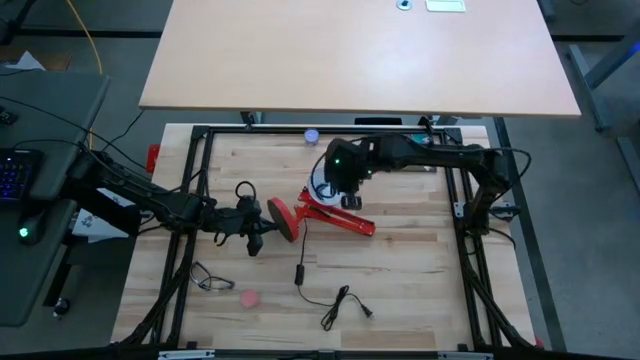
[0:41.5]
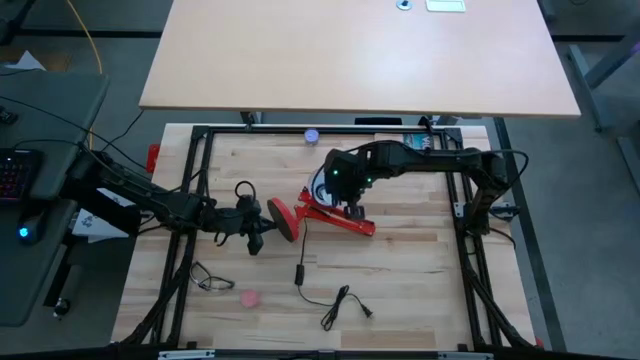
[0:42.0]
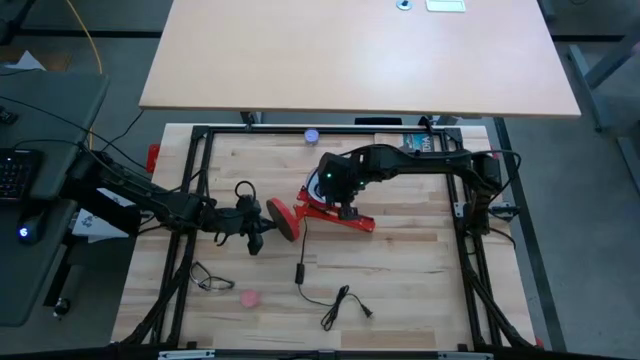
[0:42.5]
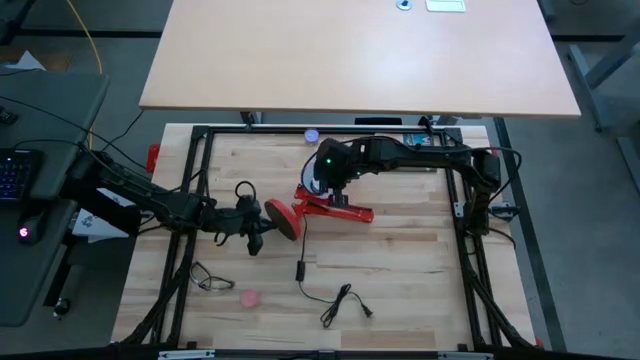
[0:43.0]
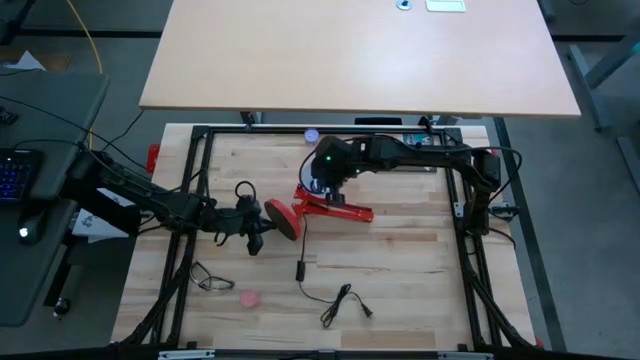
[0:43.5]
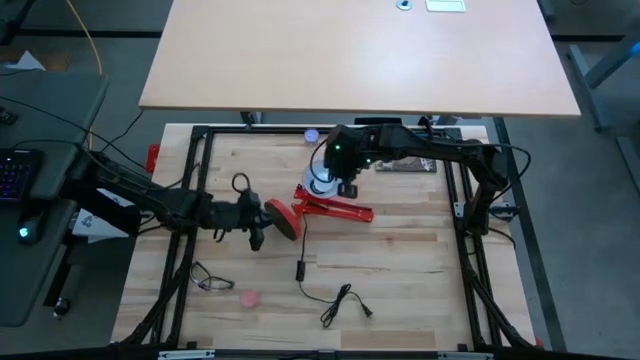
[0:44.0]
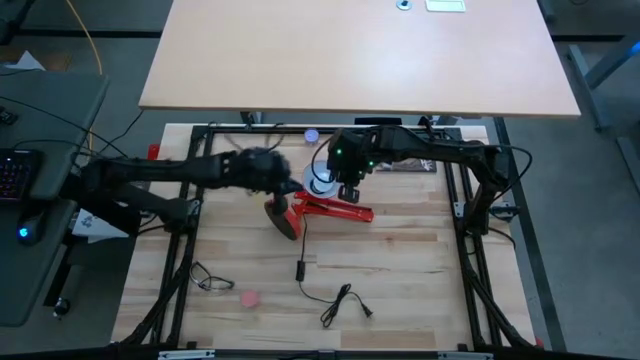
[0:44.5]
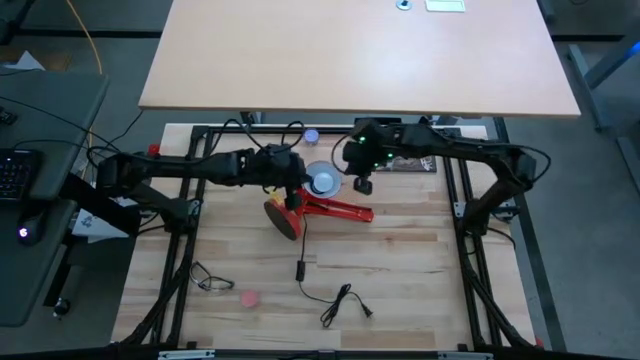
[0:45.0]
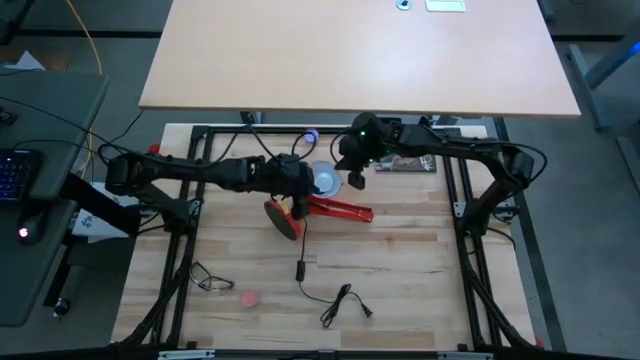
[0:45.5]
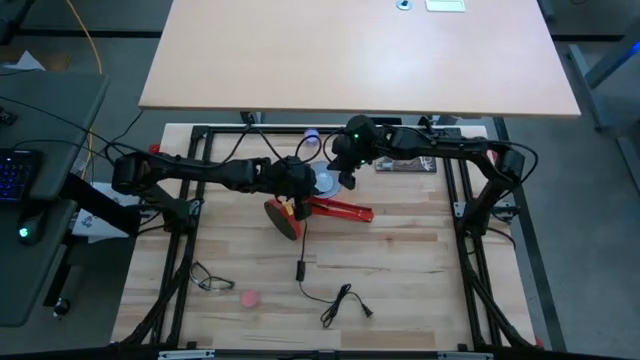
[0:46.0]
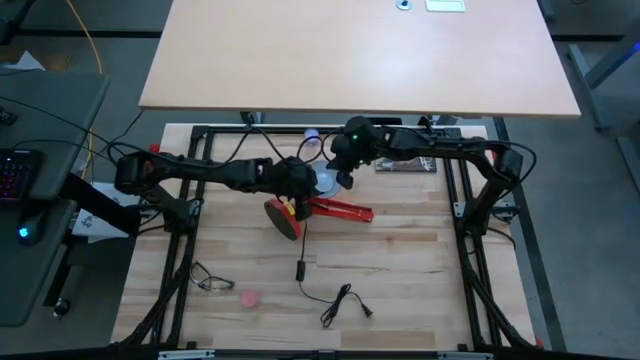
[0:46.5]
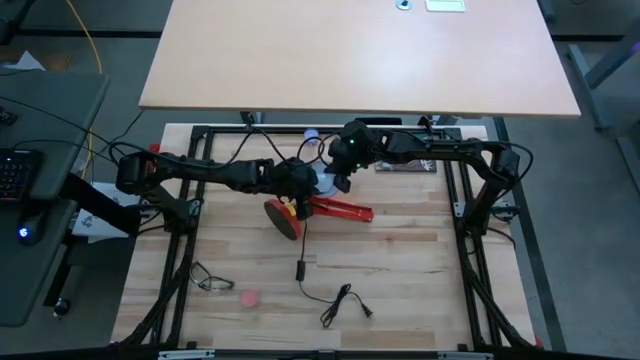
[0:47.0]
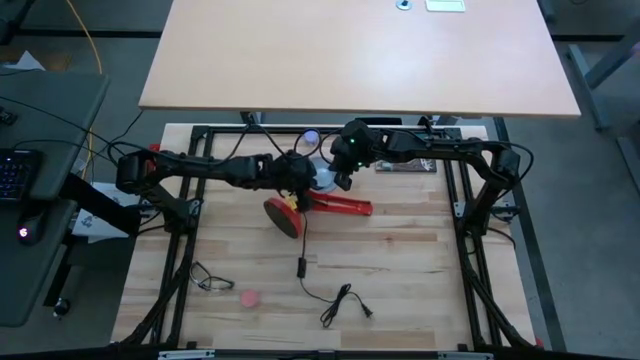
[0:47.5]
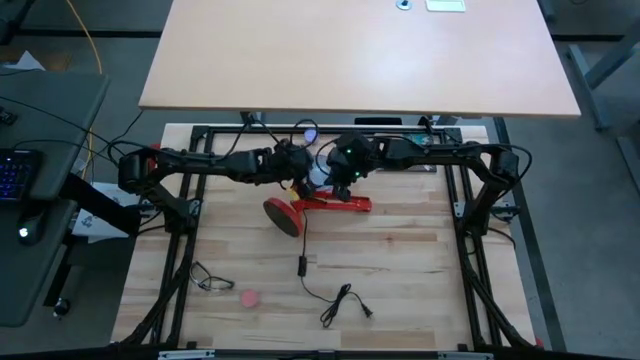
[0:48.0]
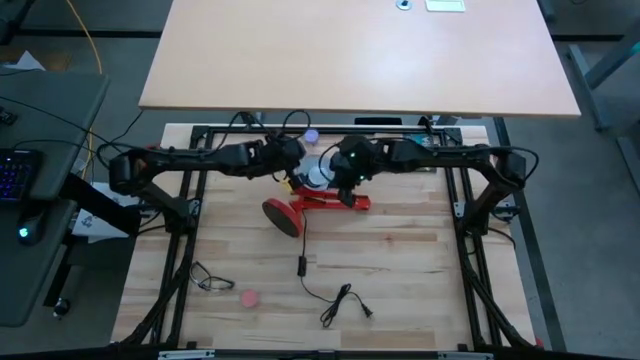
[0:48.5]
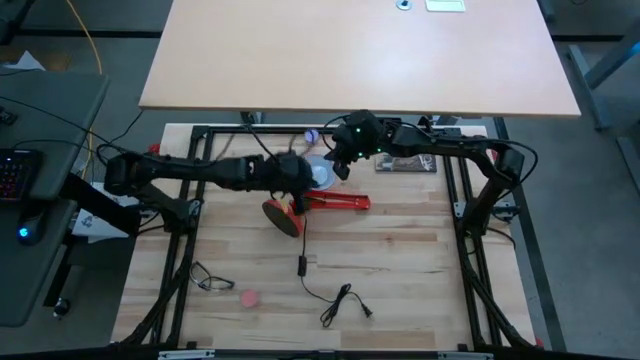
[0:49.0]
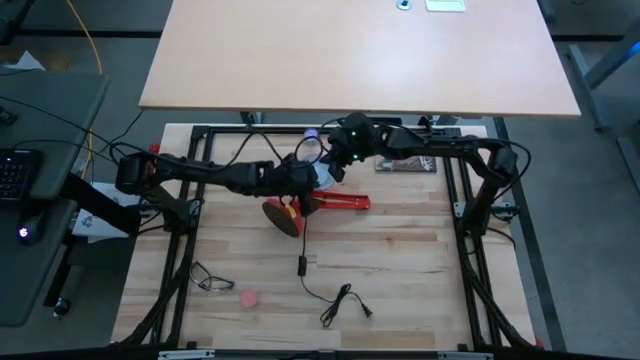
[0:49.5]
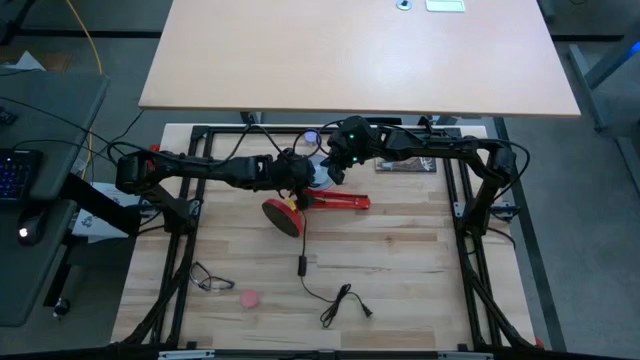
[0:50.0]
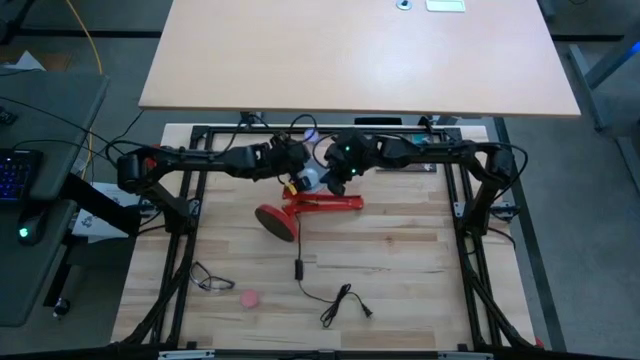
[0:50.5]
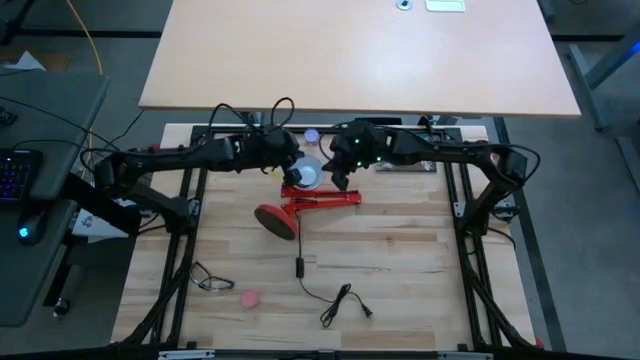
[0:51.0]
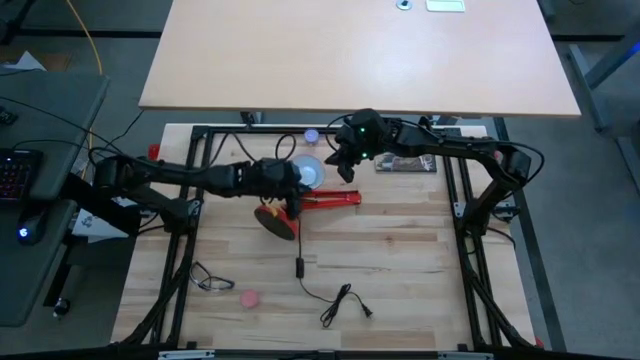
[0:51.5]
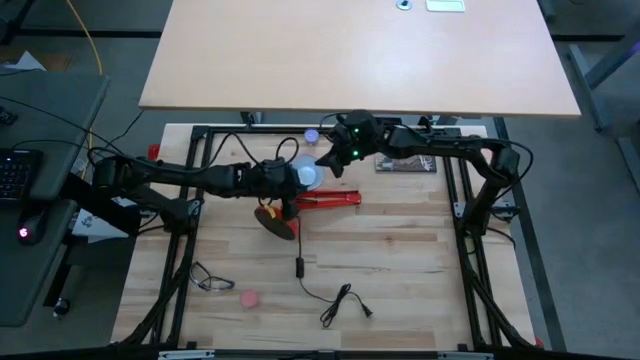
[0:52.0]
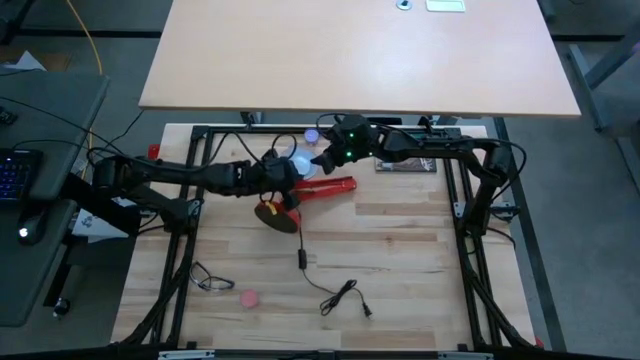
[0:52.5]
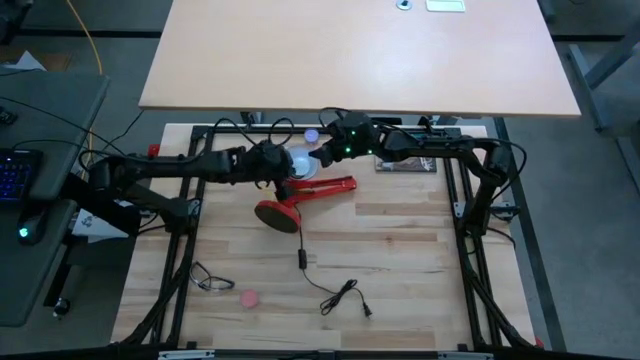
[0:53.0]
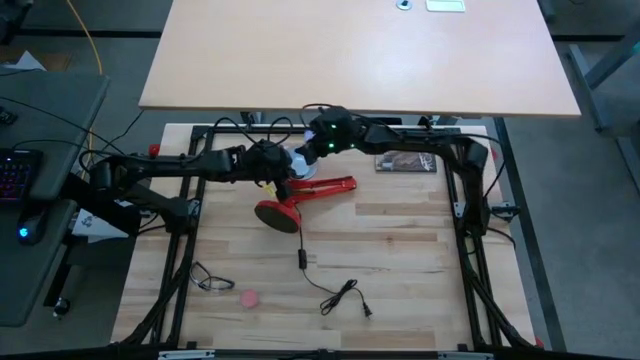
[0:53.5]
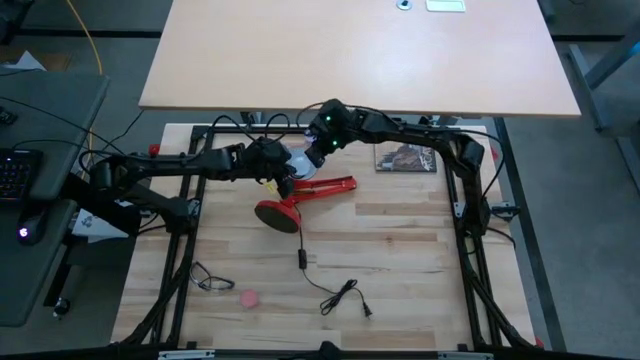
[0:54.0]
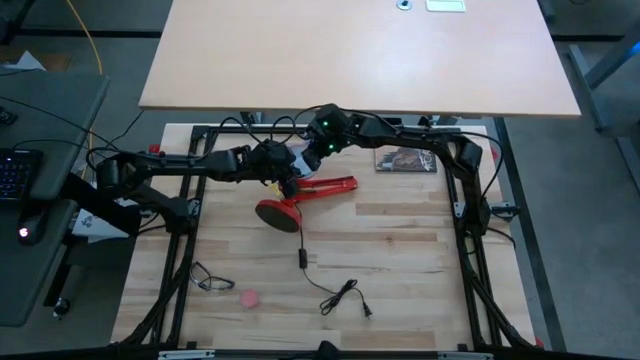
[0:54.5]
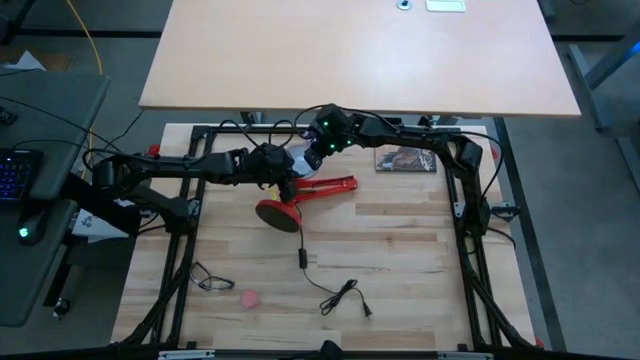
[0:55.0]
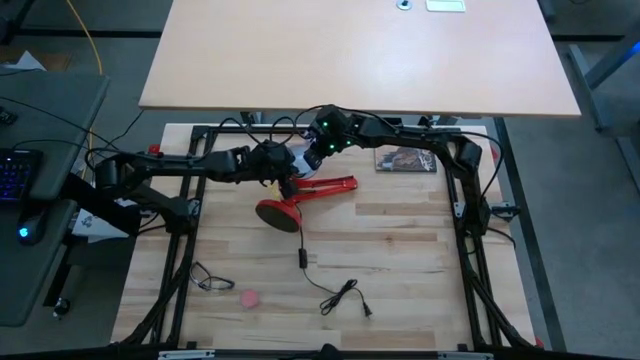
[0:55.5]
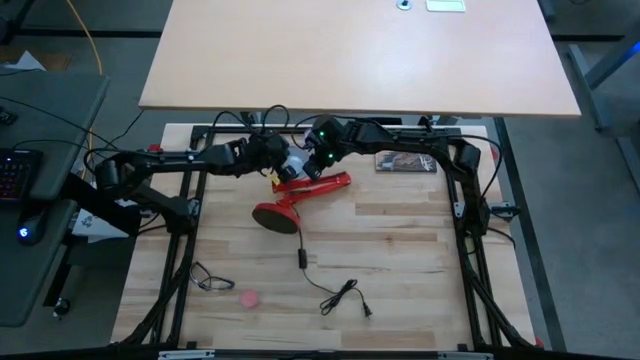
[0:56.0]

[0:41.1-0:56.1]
Task: Screw lightbulb
Insert the lightbulb into the desk lamp

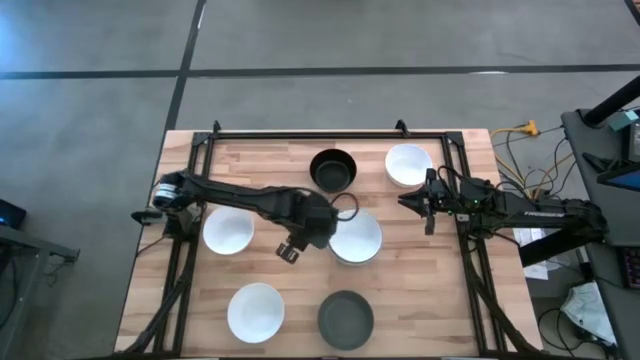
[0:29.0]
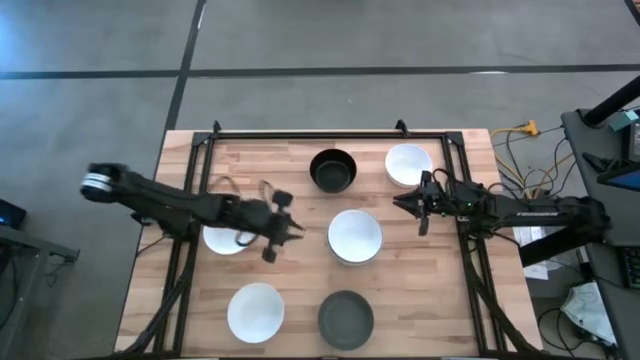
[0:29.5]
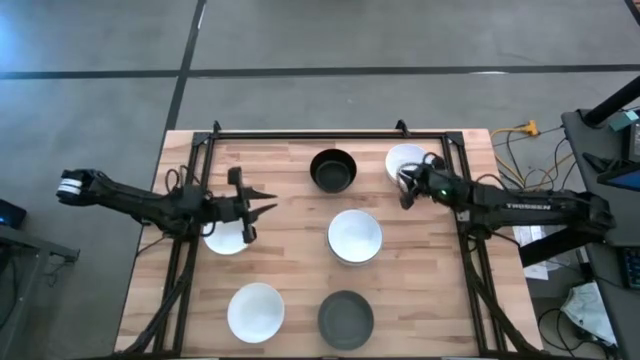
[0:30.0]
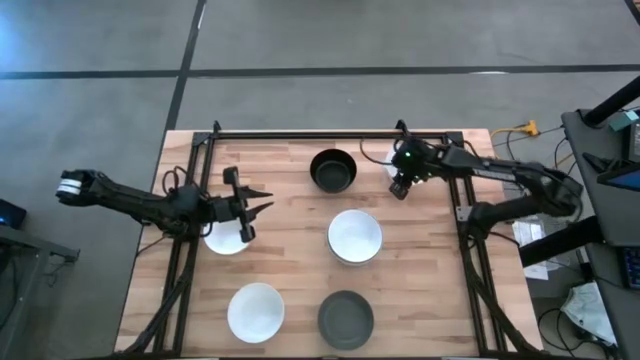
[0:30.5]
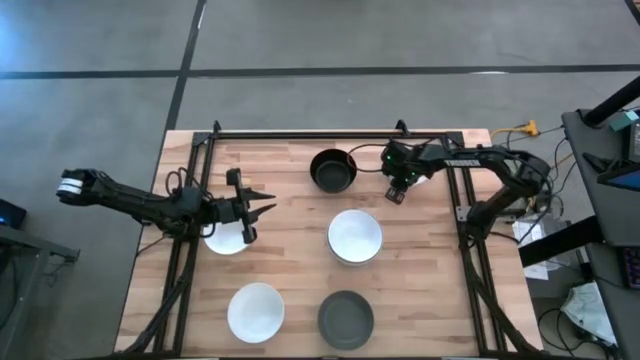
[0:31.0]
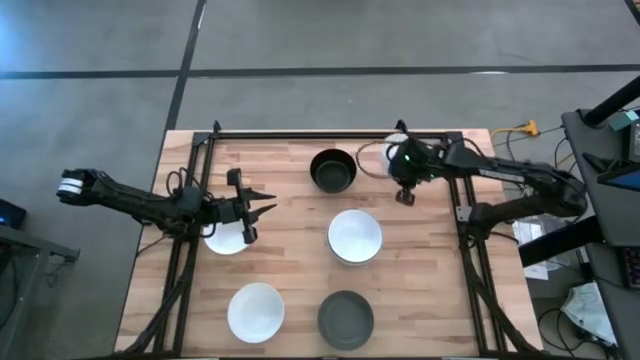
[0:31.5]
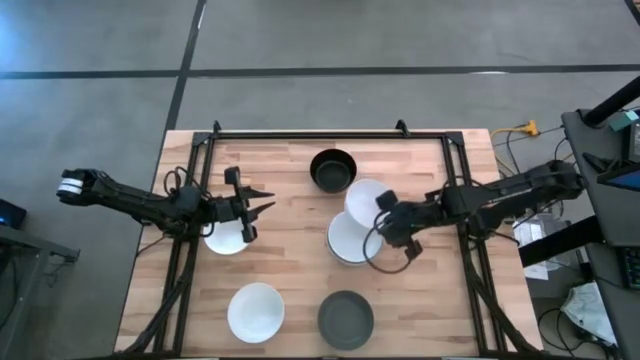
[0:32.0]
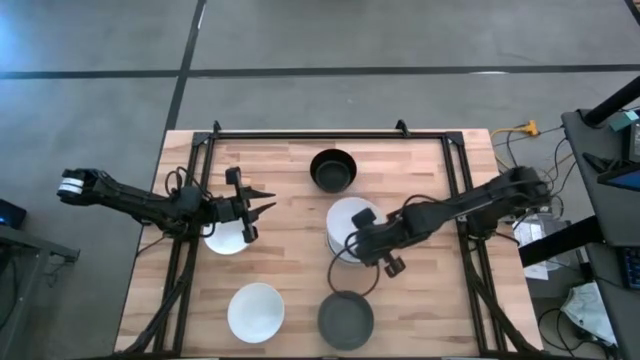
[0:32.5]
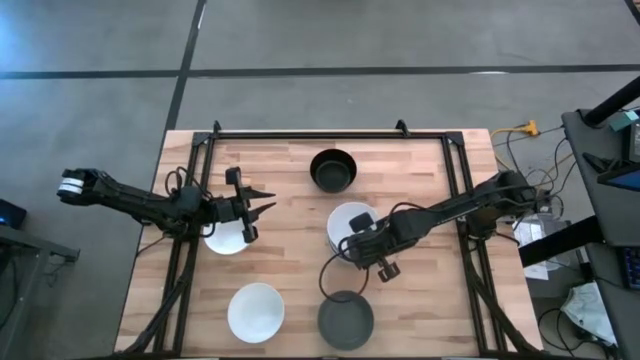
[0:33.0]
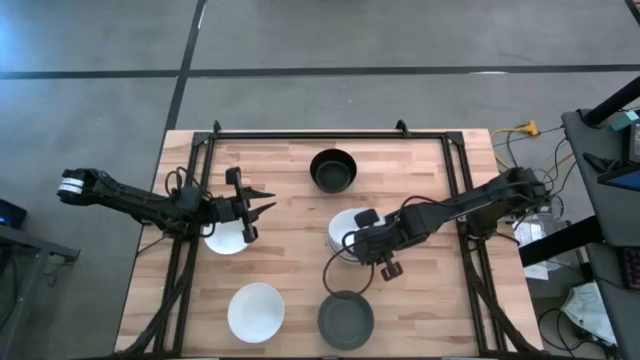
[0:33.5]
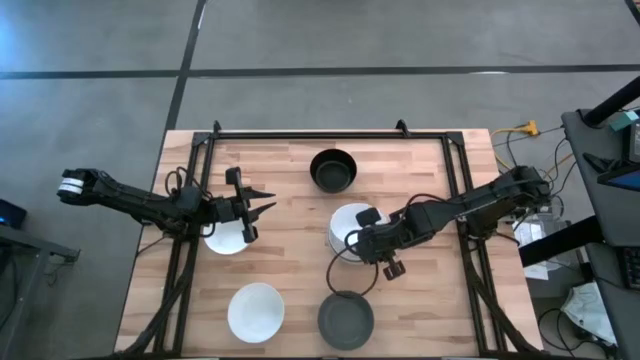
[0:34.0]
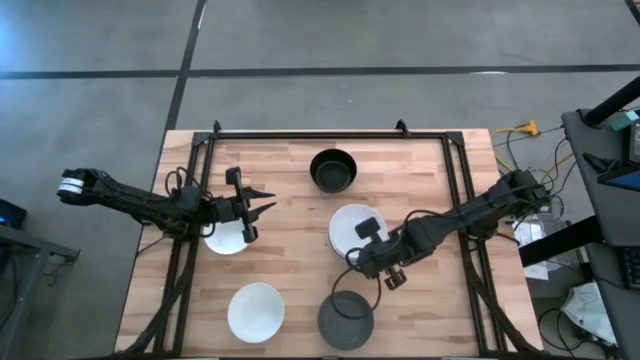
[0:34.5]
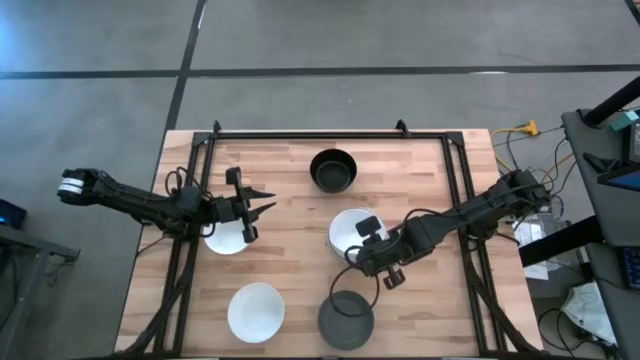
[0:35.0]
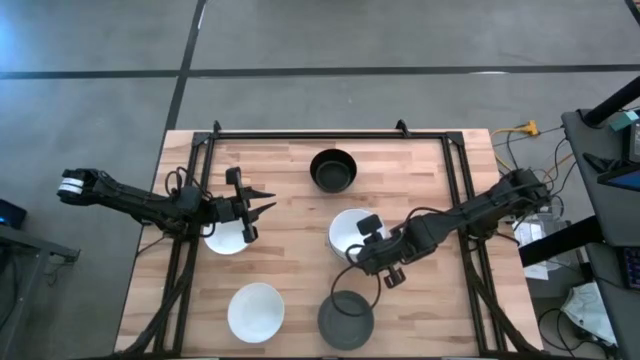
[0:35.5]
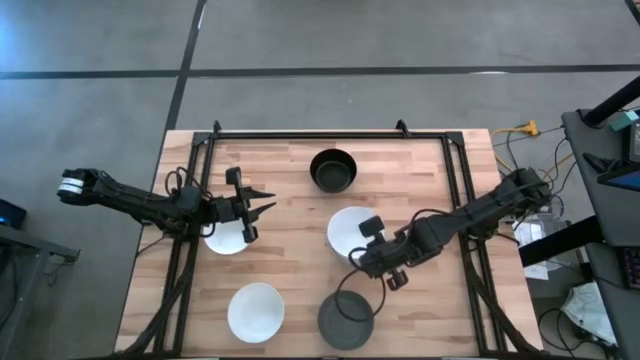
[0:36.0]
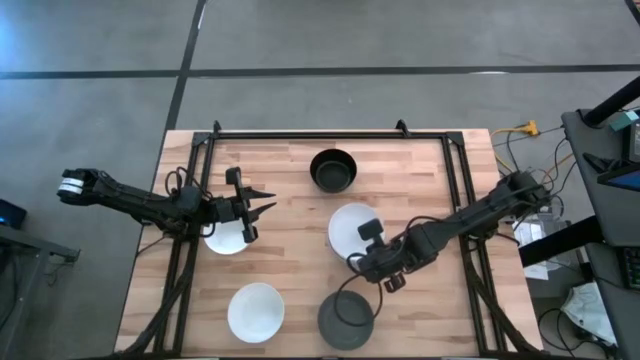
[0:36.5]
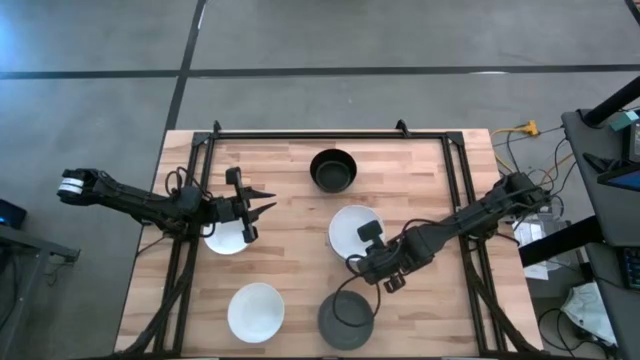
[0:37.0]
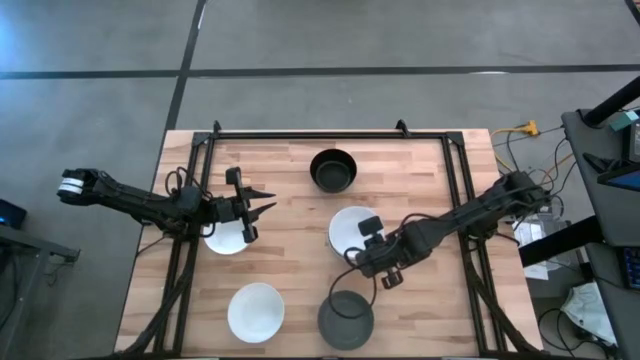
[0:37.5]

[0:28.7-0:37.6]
Task: Nest bowls inside each other
Stack the white bowl on top of the other white bowl
